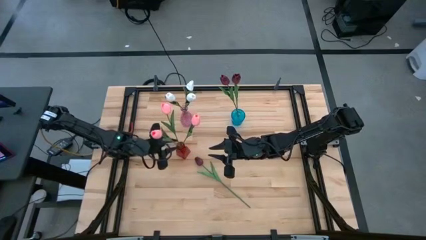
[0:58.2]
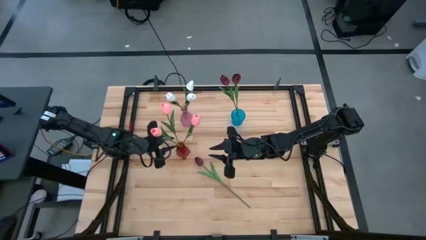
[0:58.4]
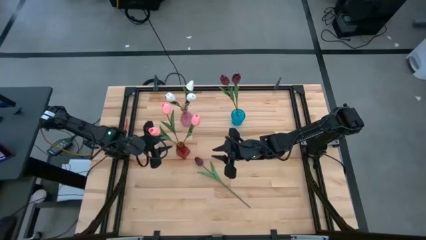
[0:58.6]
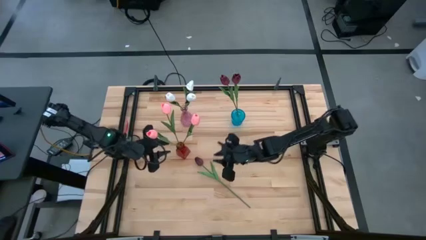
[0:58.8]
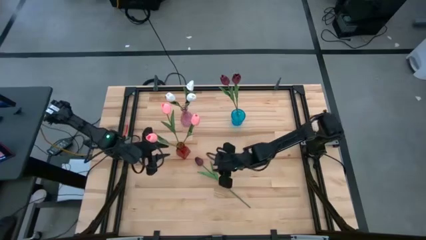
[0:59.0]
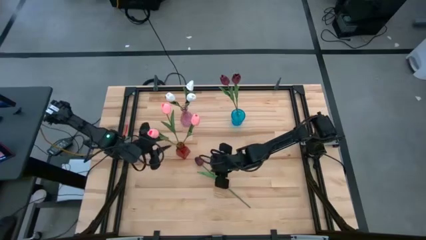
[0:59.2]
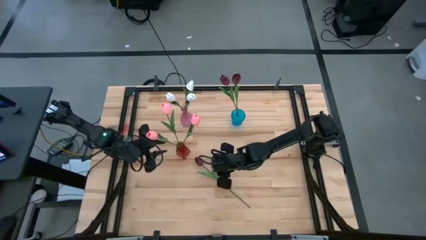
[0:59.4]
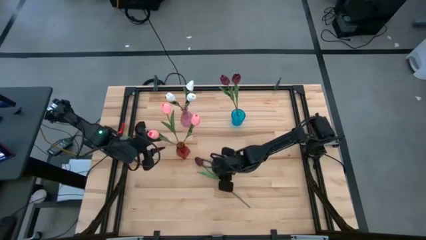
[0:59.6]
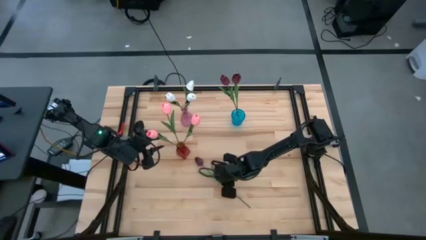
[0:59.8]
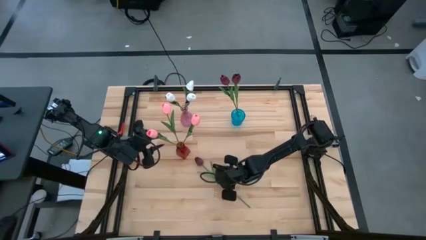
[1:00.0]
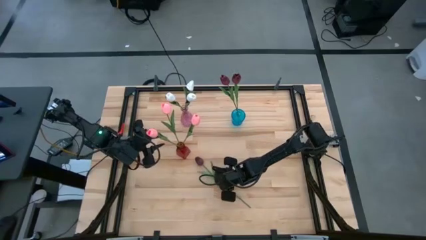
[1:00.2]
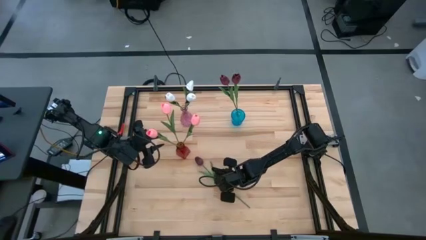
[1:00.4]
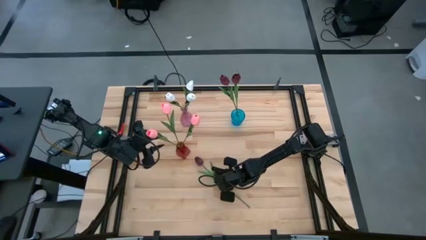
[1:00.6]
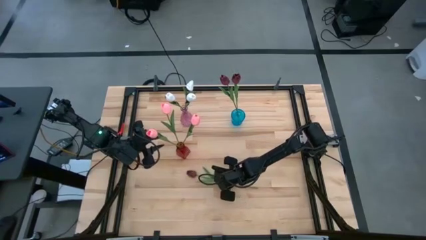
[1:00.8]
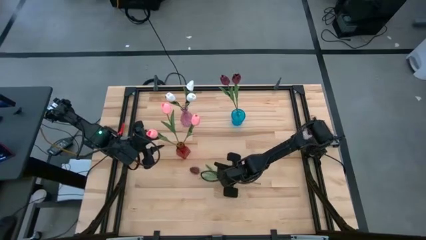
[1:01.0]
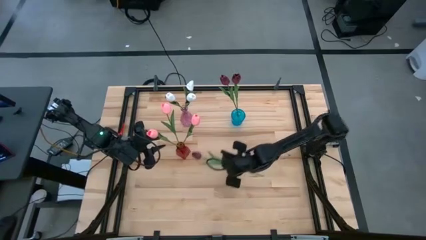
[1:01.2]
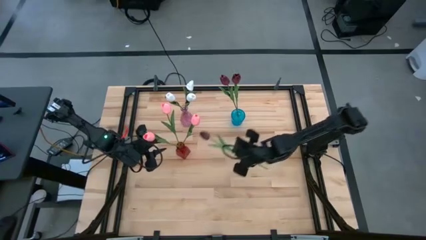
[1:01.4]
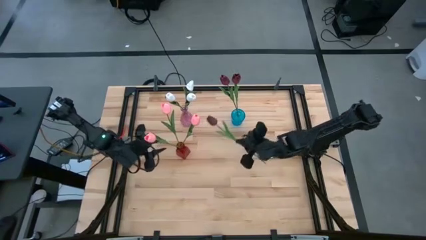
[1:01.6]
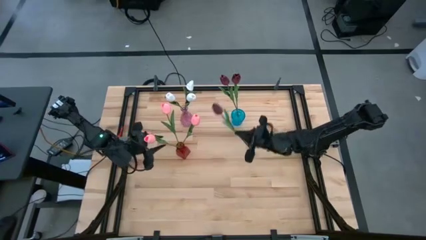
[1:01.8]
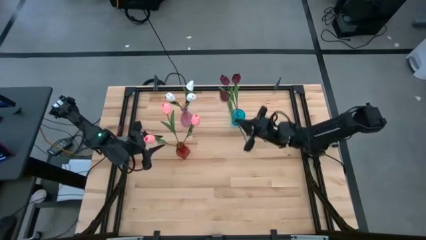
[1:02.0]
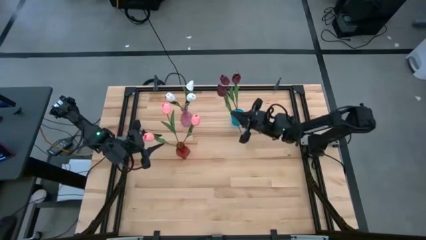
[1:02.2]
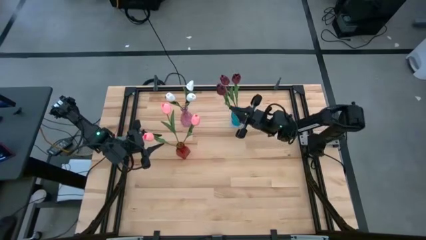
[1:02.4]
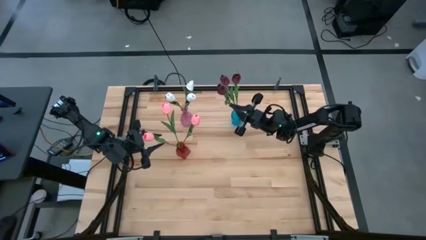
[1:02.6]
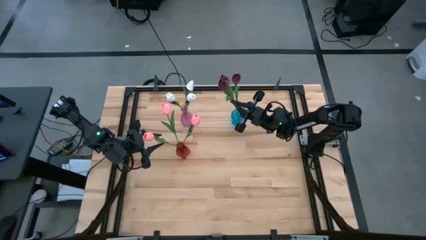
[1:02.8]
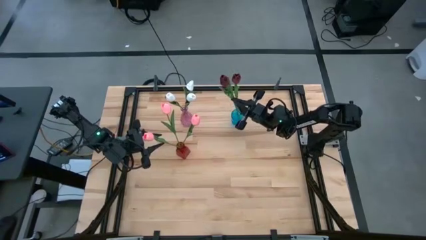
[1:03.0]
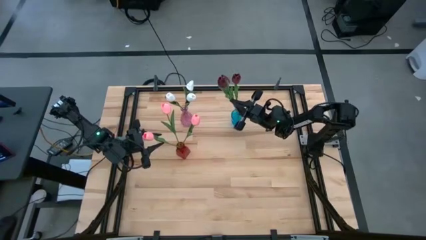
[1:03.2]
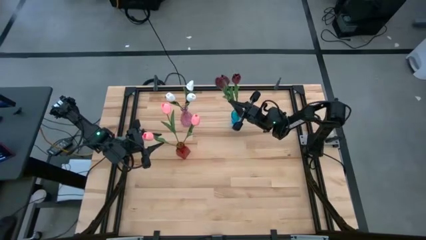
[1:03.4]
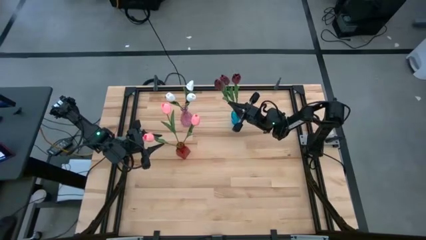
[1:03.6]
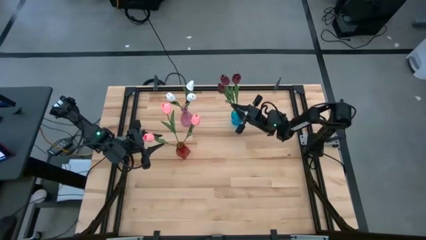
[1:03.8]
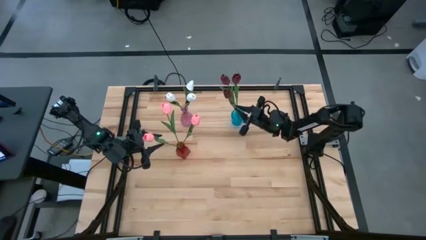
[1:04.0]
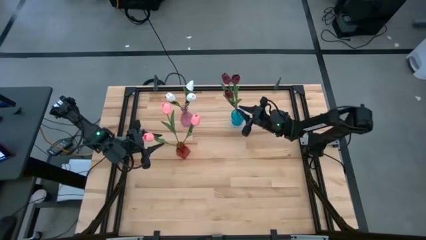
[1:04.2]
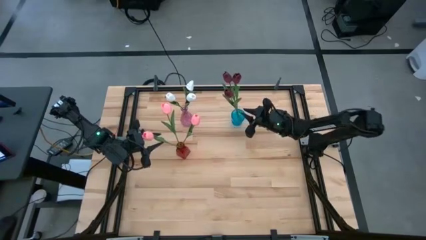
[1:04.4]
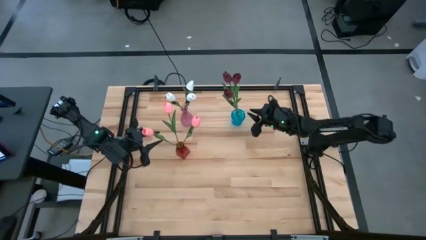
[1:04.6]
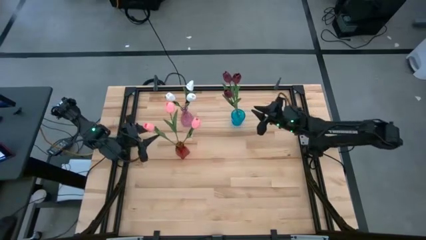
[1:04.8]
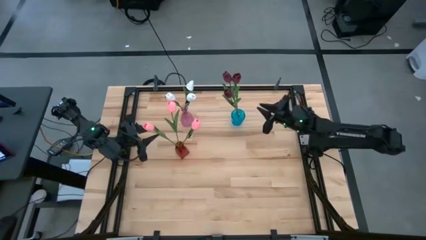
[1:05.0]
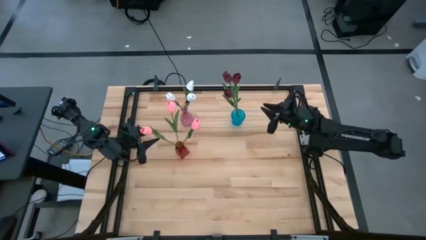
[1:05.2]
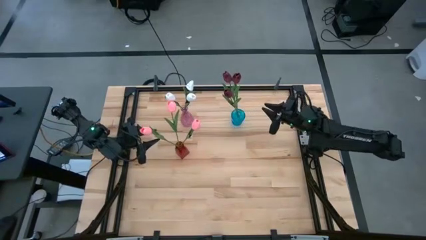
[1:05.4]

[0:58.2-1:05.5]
Task: Sort flowers into vase by color
Put the red flower into the red vase

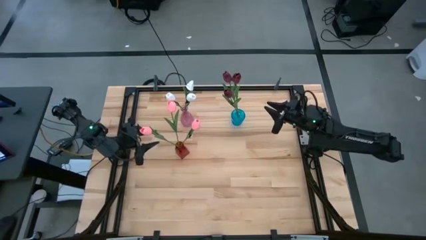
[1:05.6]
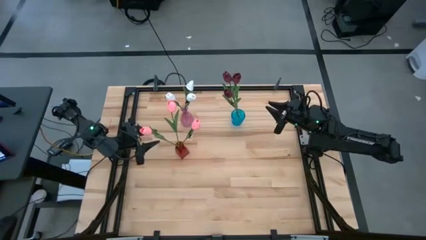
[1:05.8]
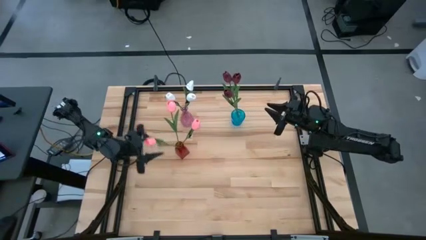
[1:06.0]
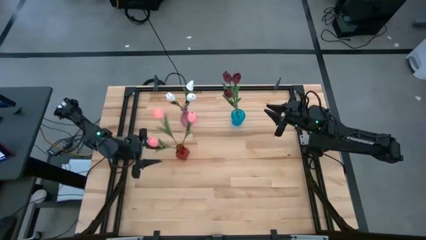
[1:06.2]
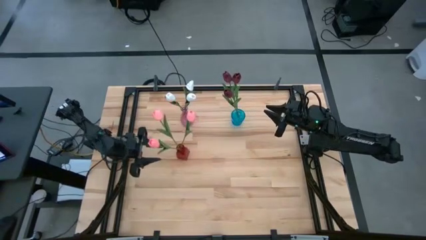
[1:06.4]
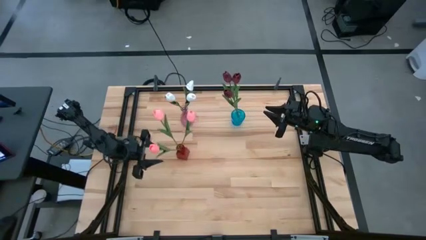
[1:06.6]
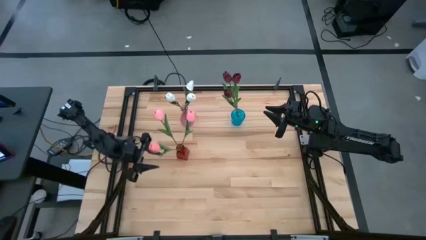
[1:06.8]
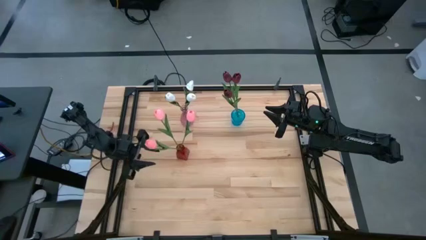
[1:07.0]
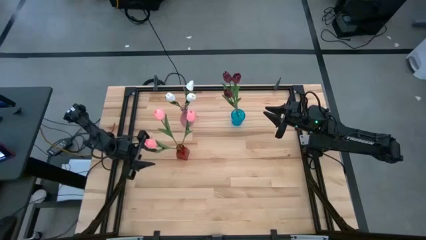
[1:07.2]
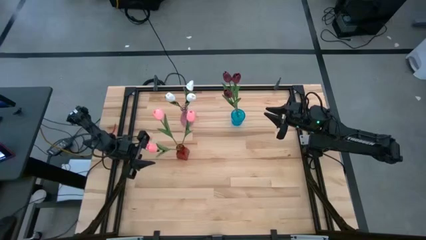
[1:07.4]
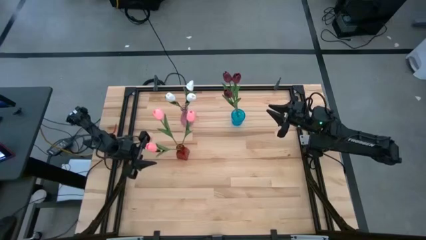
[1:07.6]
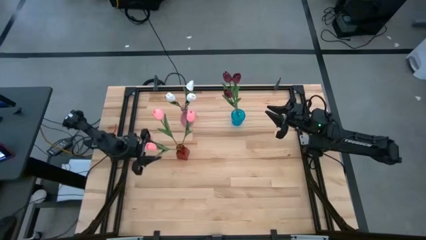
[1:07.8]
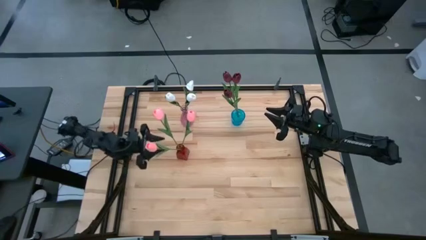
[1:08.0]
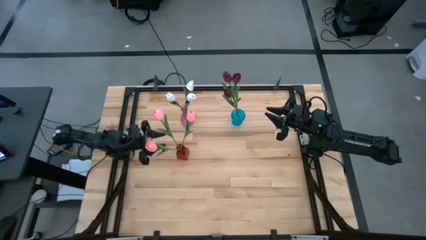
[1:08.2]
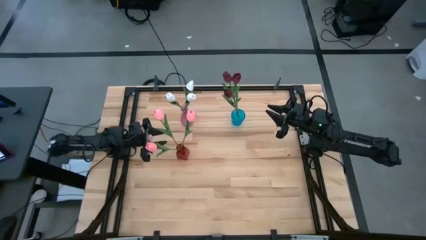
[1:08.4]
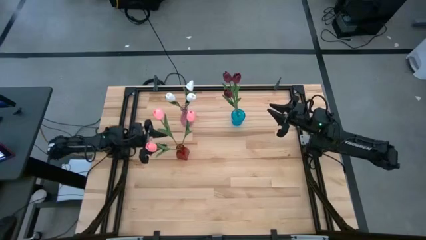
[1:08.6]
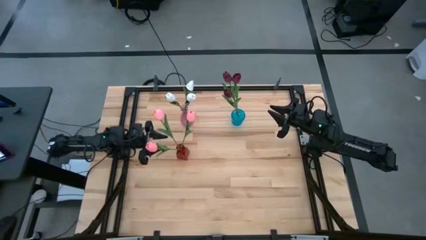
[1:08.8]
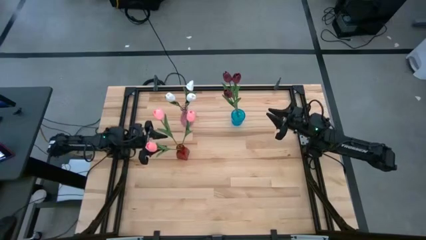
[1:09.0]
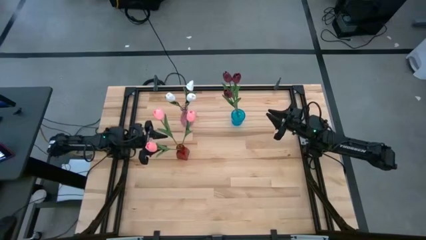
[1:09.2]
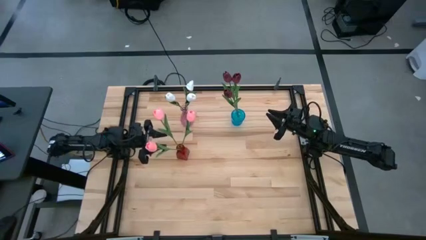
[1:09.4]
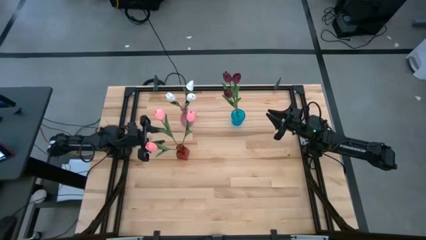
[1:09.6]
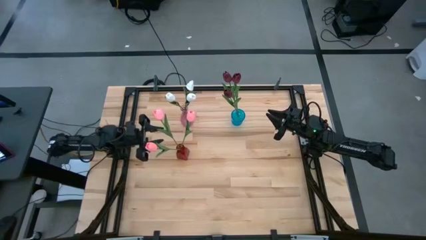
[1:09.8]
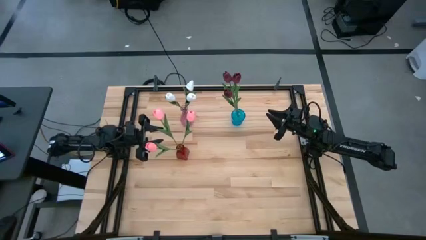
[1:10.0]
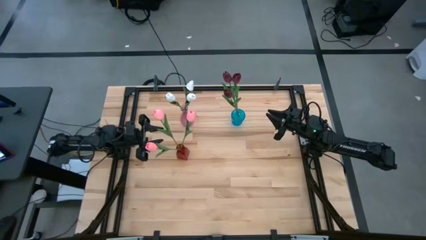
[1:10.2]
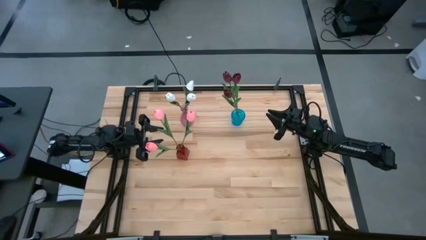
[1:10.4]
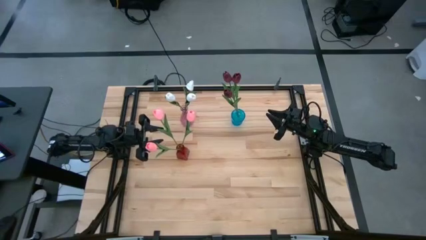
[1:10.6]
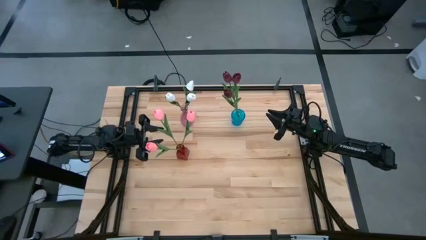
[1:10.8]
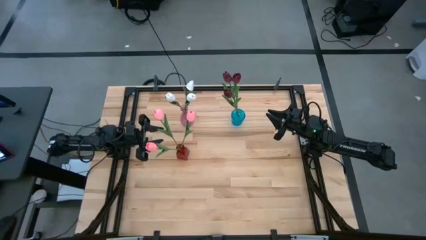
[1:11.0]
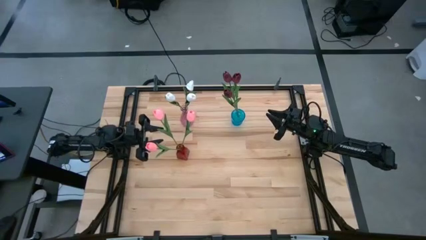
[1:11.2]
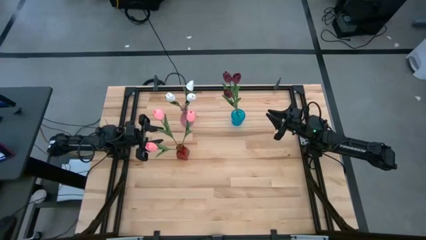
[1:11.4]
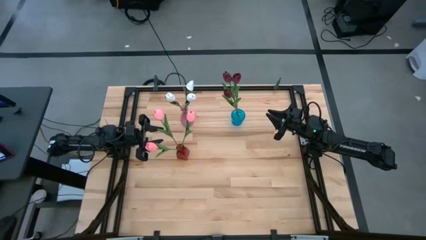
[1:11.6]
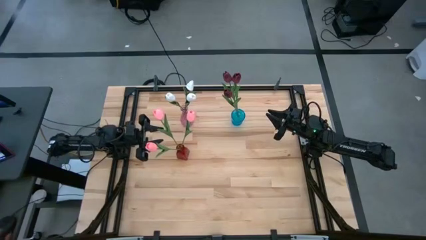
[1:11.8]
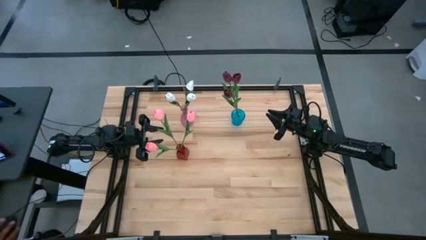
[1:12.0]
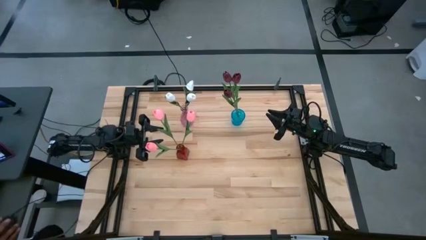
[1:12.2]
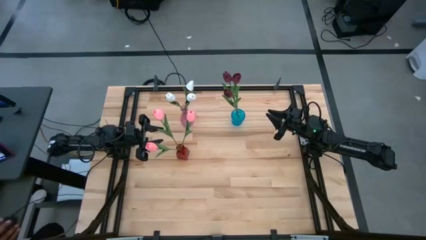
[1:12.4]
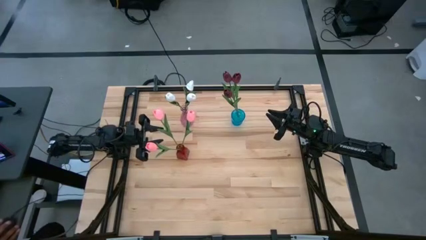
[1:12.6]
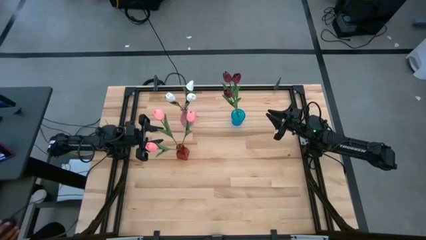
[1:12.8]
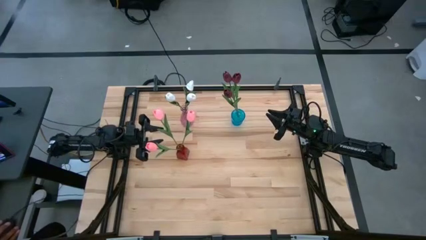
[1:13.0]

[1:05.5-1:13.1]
Return to Home Position
